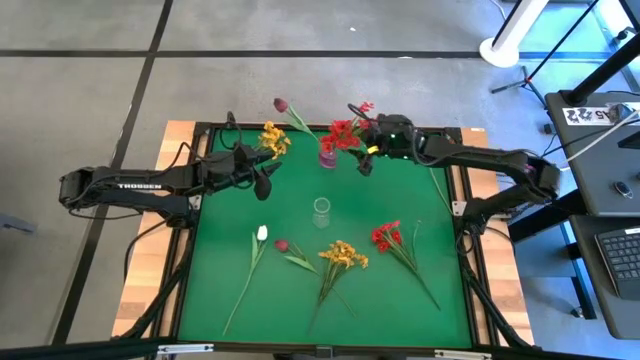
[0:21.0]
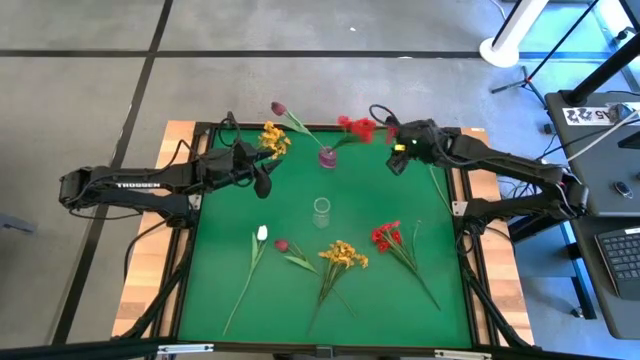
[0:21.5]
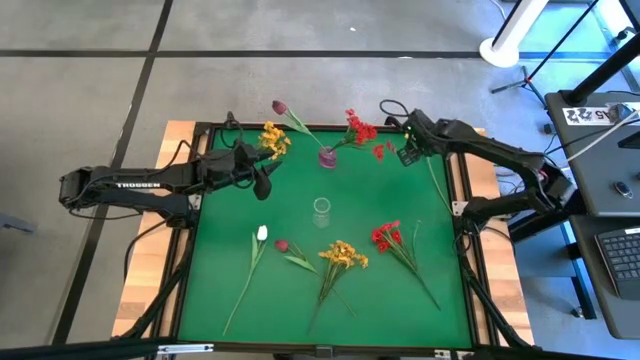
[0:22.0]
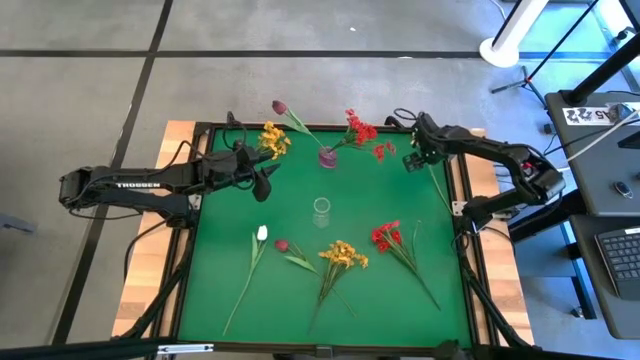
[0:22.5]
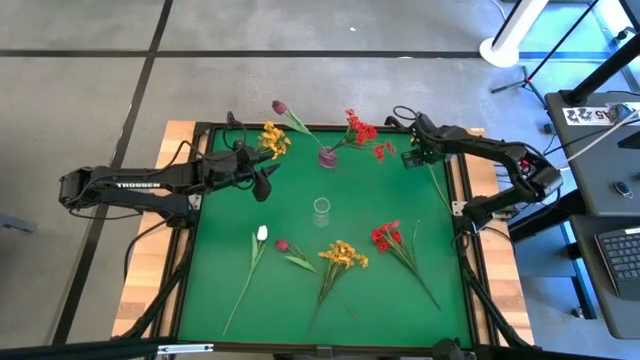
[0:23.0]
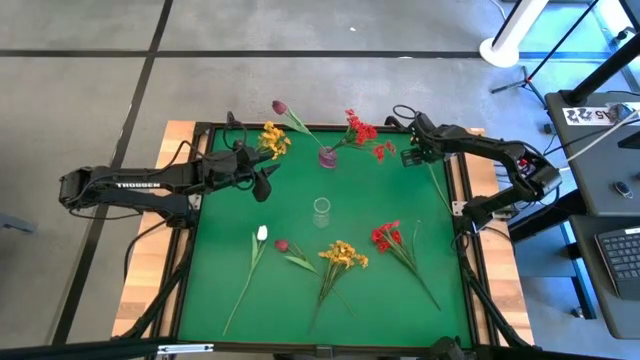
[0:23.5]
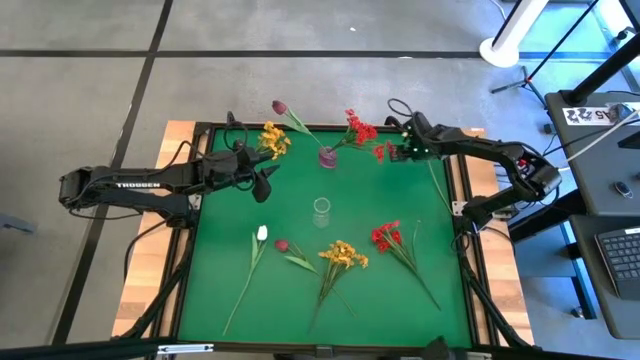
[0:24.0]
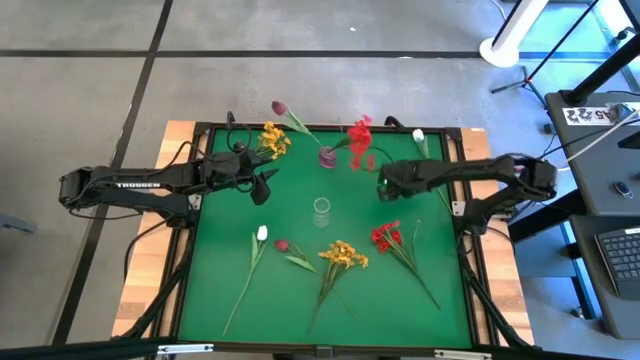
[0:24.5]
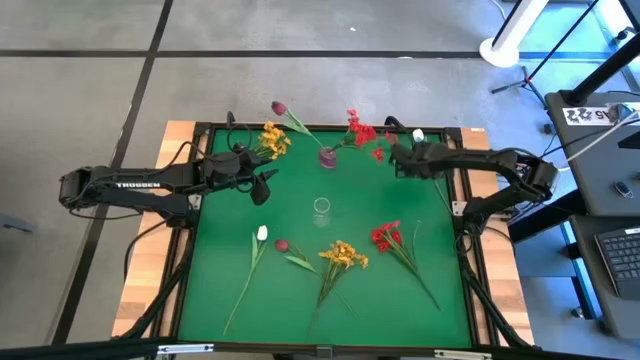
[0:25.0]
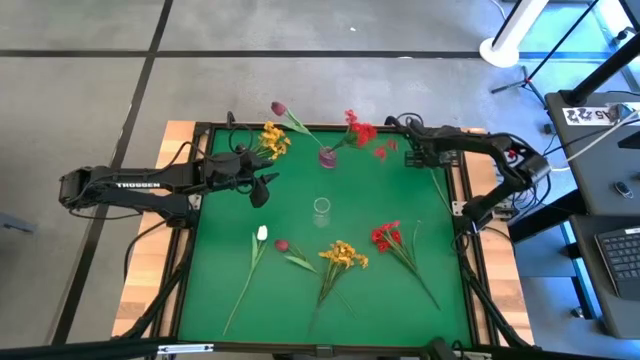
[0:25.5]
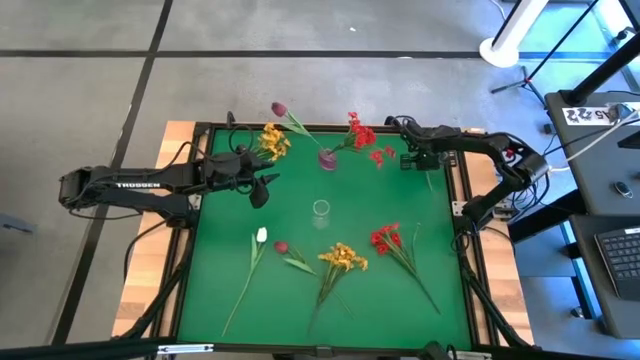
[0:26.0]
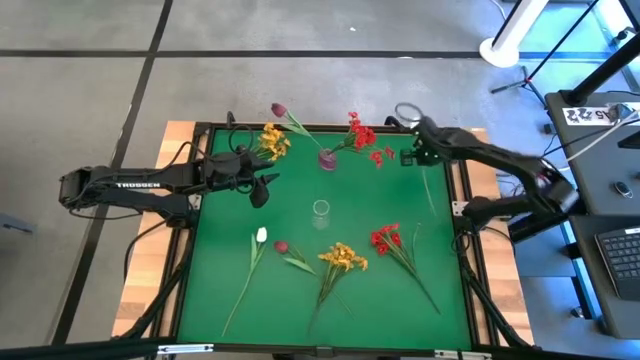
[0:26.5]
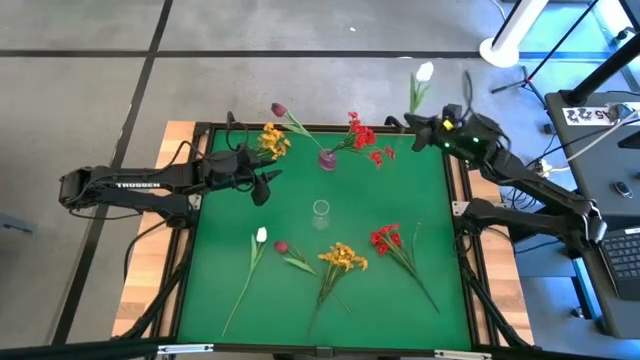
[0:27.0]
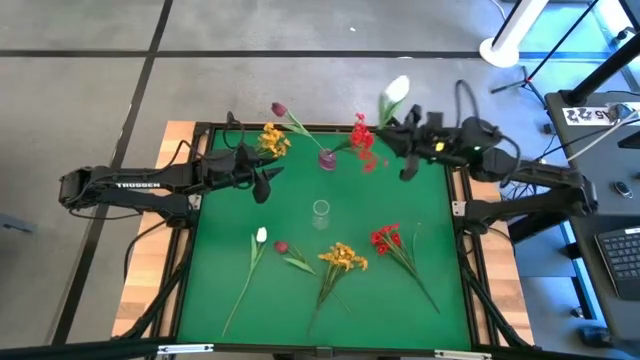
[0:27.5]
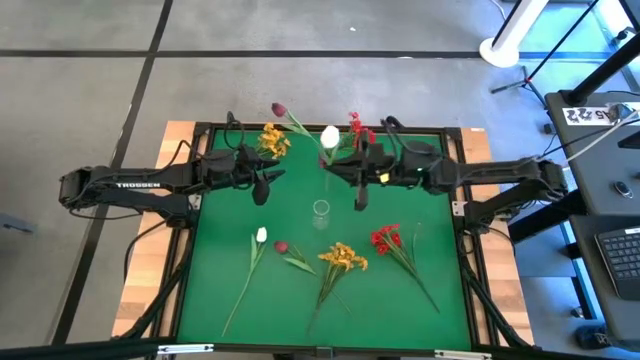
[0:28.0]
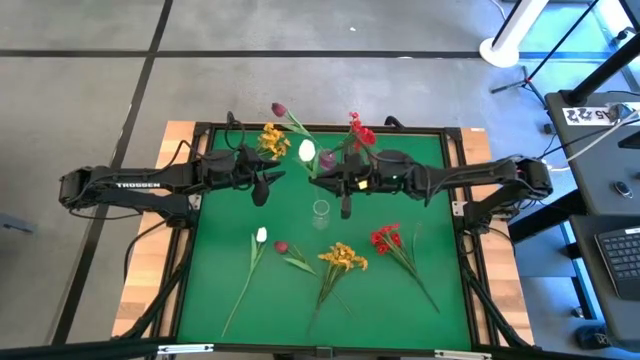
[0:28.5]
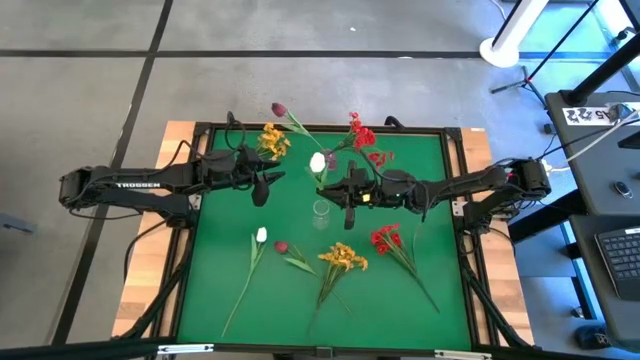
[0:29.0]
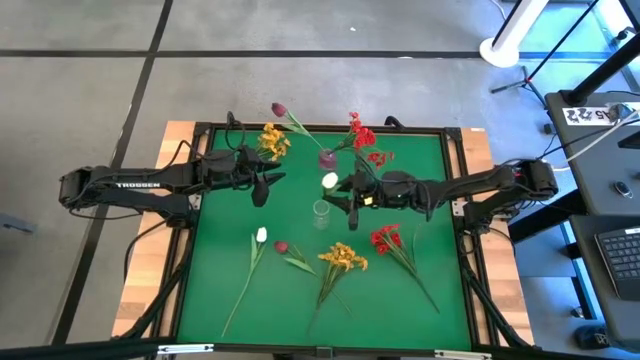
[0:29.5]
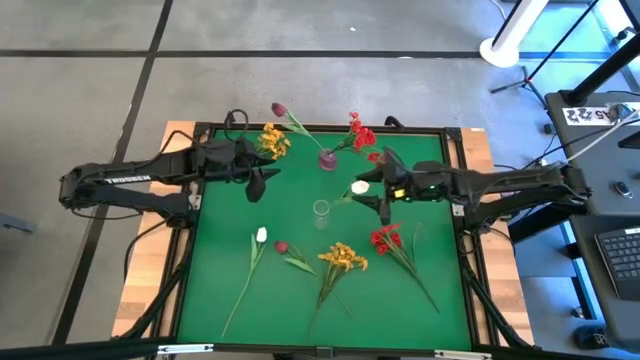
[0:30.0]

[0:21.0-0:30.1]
Task: Sort flowers into vase by color
Put the right white tulip into the transparent vase

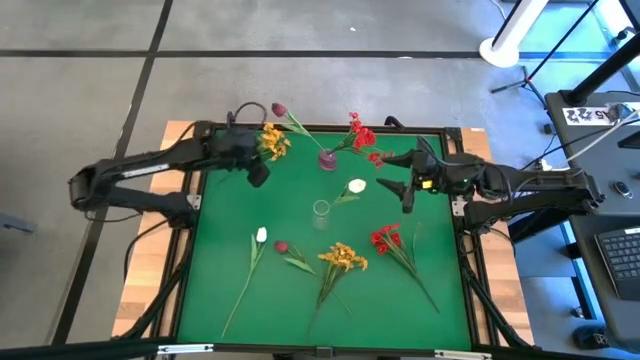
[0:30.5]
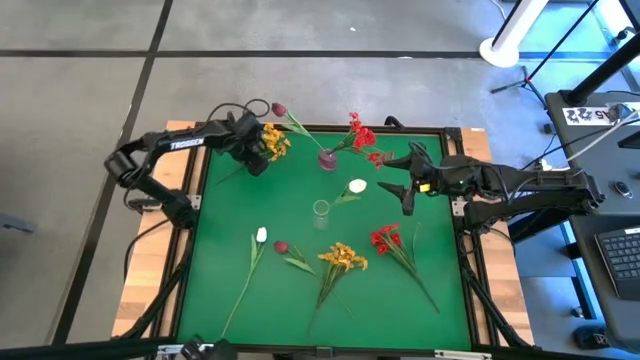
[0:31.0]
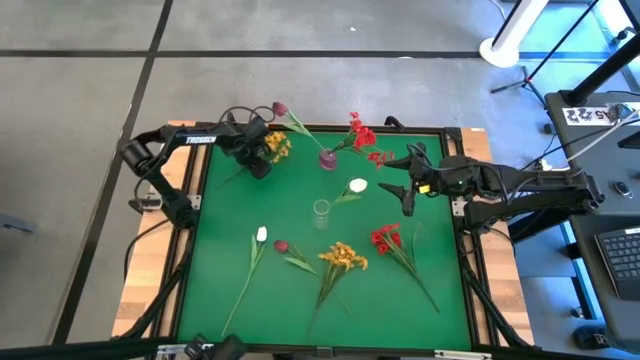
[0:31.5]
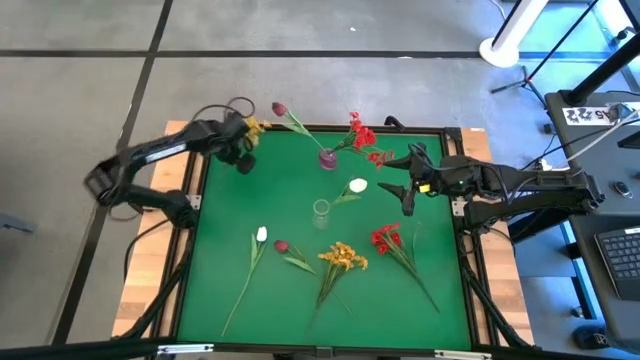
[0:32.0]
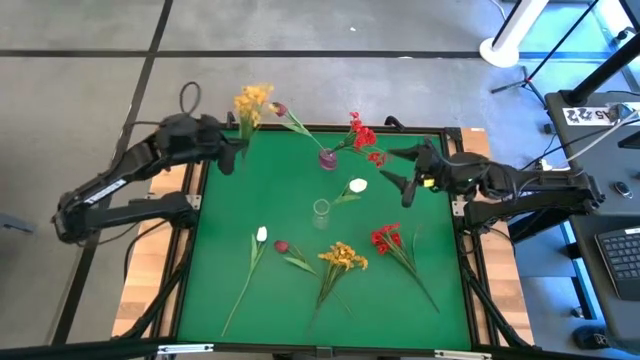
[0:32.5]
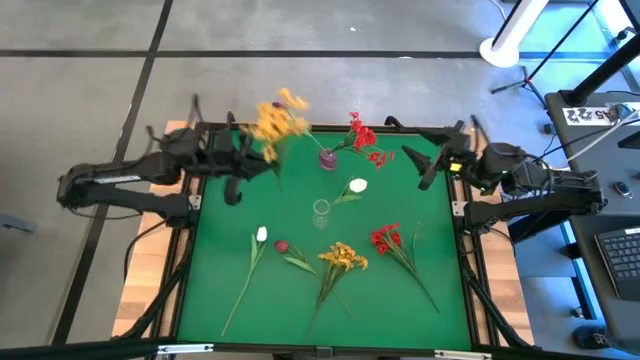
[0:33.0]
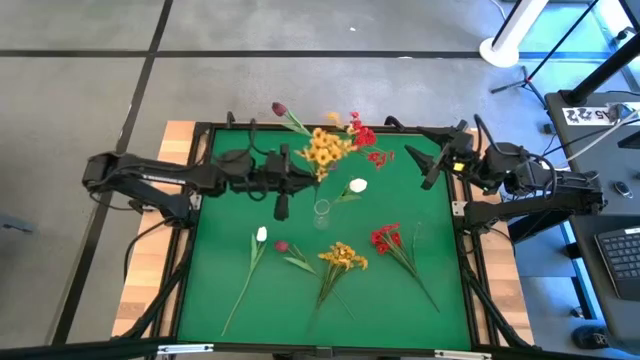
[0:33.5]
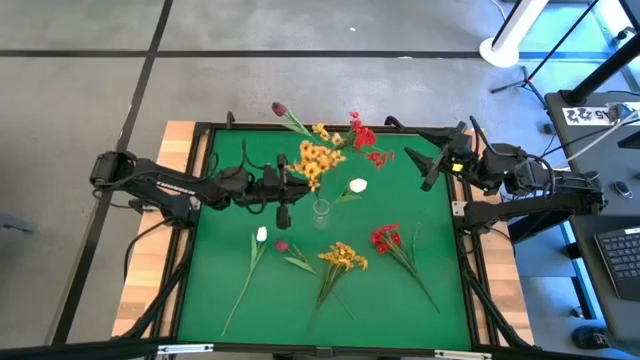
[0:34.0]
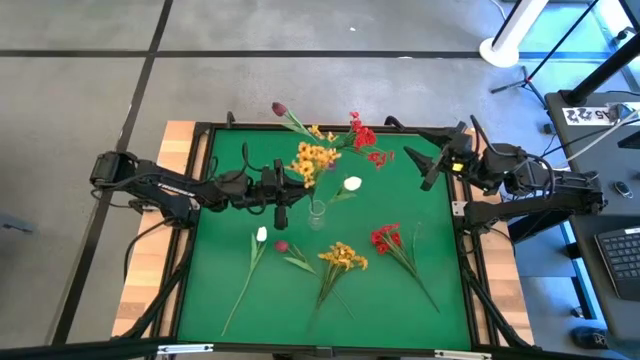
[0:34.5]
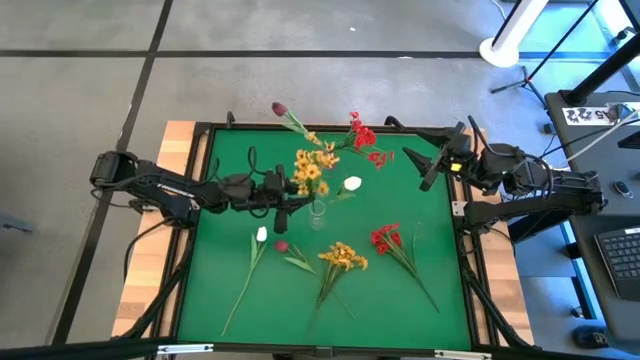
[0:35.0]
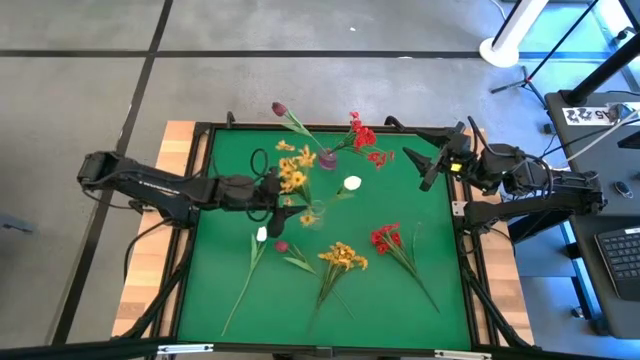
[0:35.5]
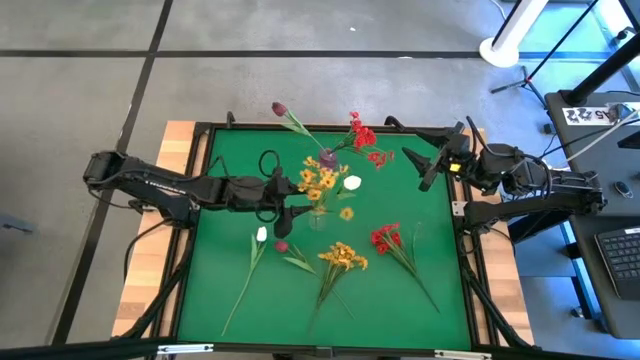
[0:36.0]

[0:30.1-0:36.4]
Put the top yellow flowers into the transparent vase

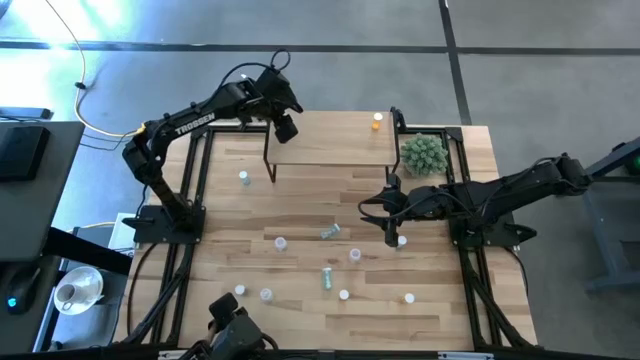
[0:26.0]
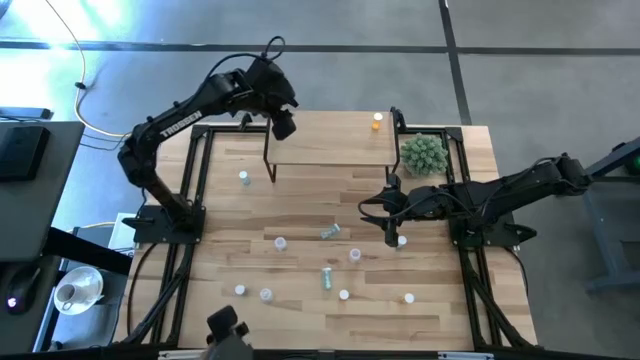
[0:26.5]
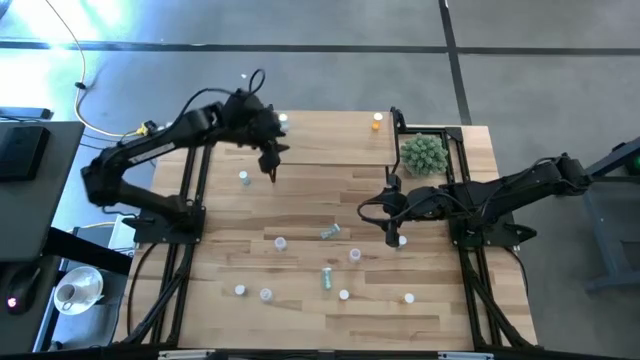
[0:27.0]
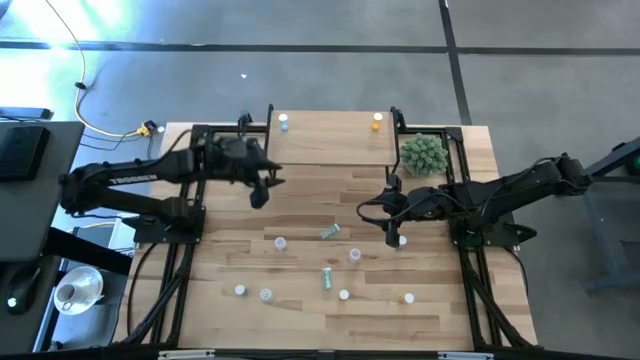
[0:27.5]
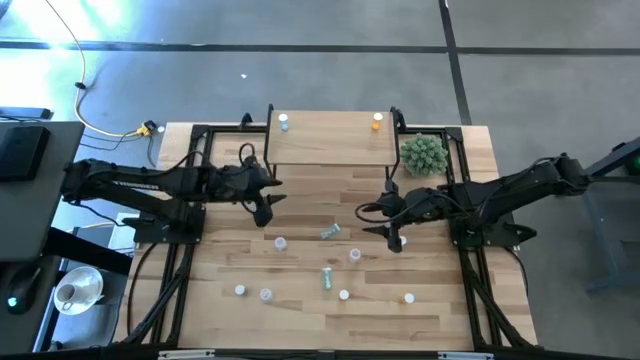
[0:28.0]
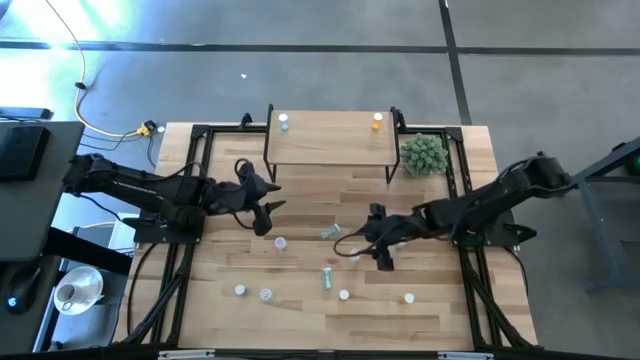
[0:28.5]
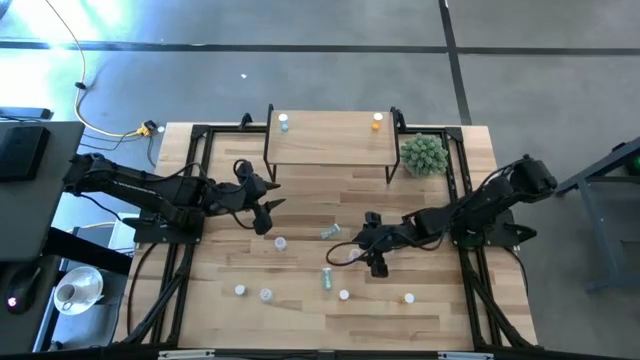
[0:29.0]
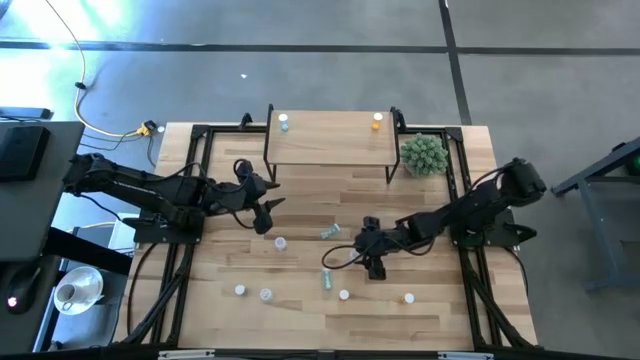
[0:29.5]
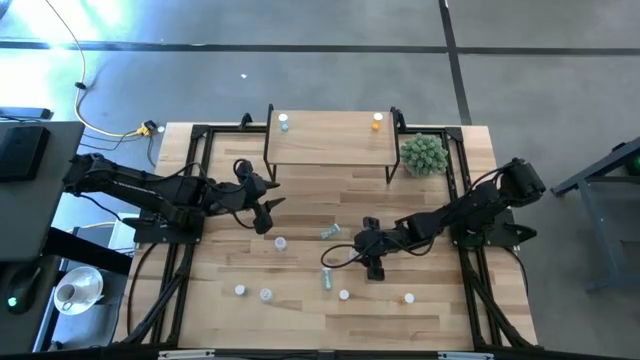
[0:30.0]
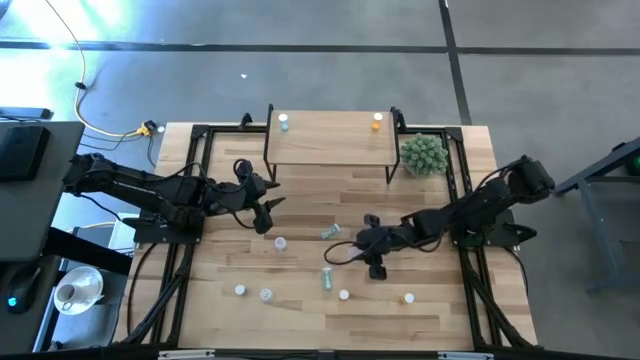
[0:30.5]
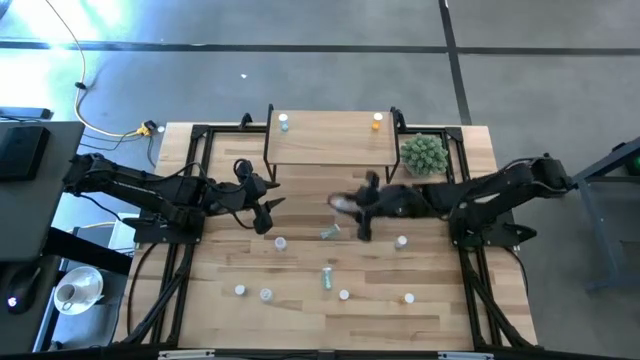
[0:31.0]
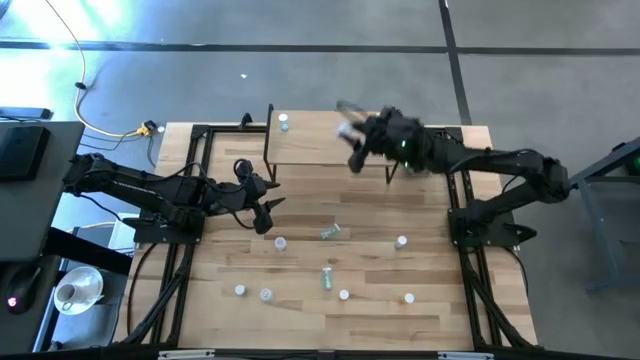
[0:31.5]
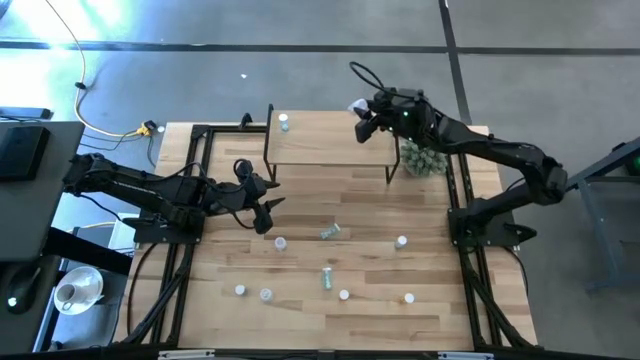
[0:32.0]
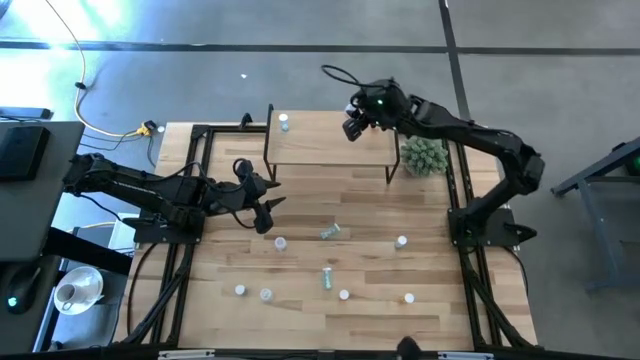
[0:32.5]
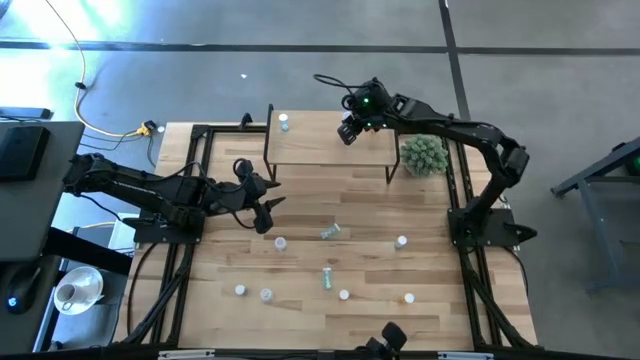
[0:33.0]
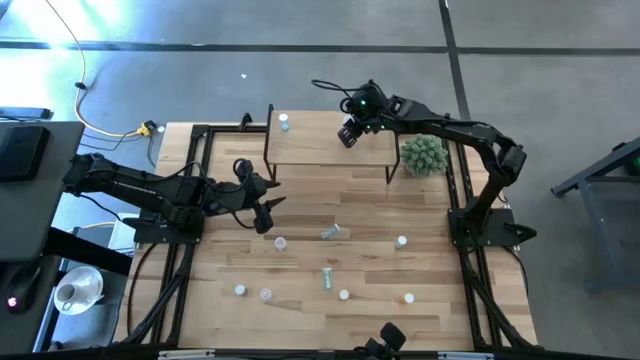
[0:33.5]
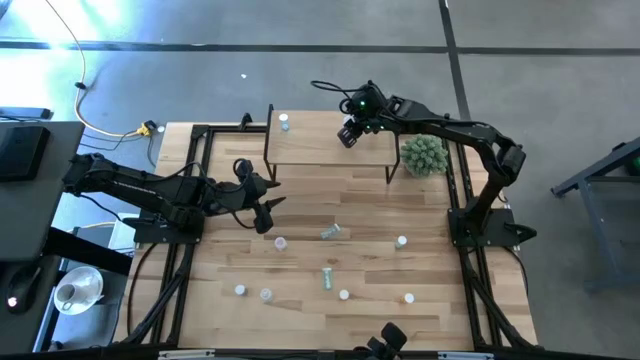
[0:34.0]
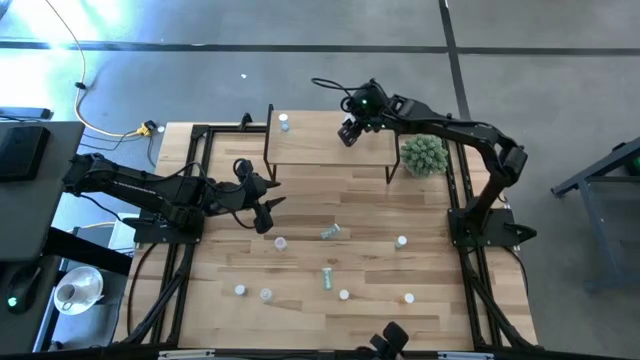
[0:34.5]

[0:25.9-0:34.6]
Task: Pick and place medicine bottles onto shelf by color
Put the top right transparent pill bottle on the shelf
